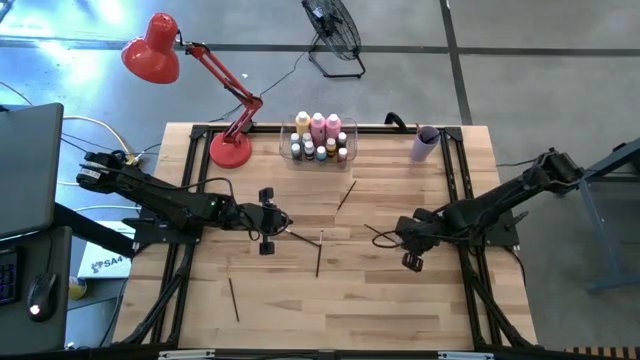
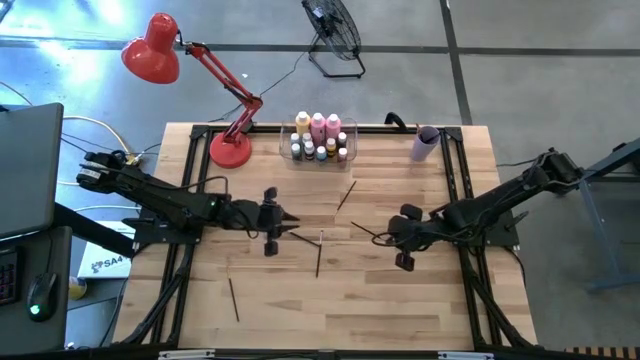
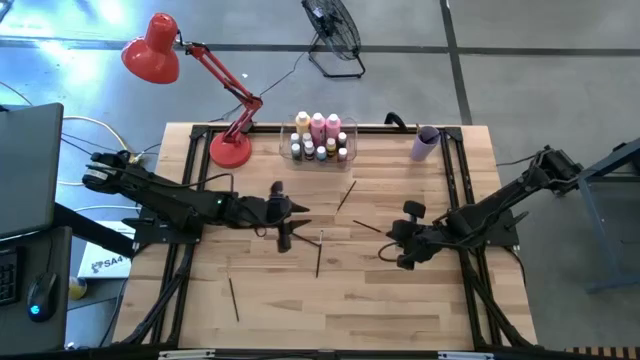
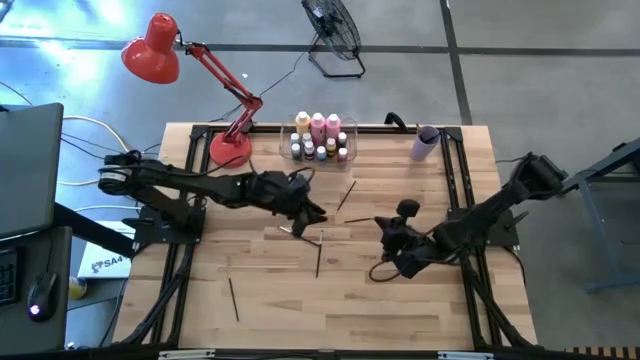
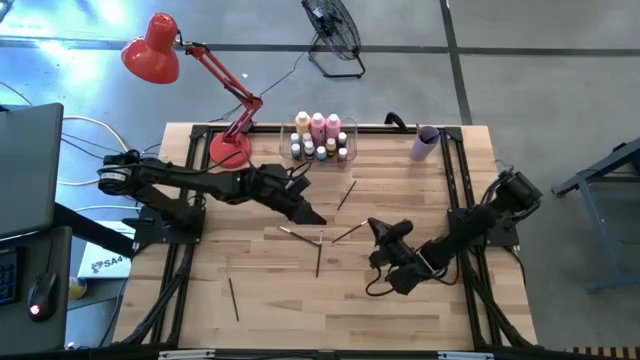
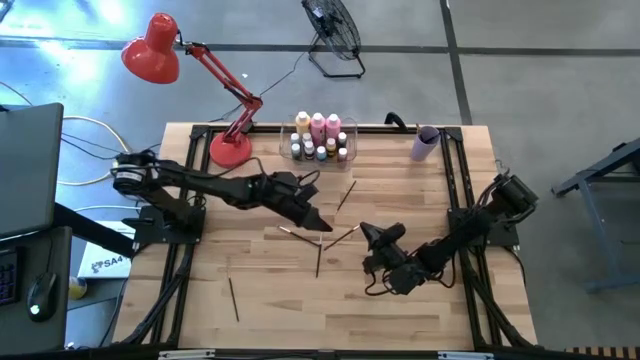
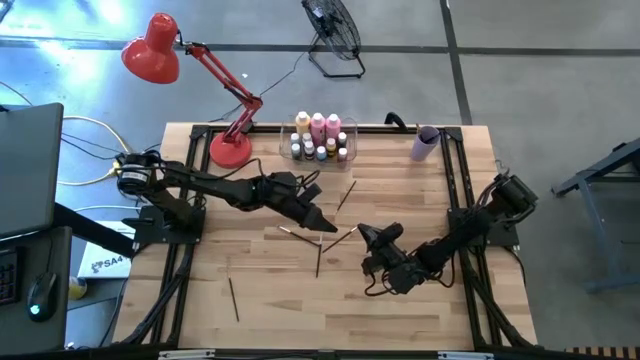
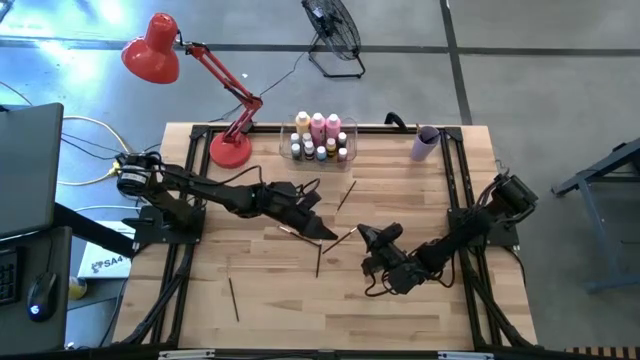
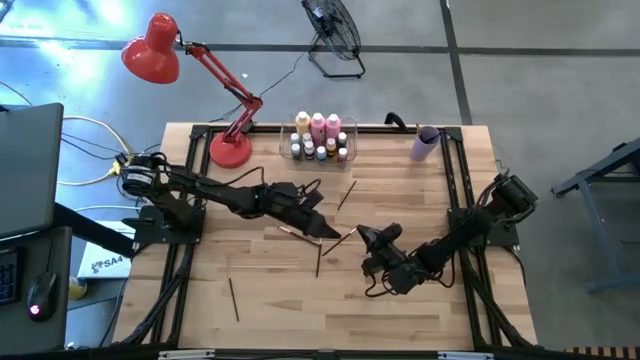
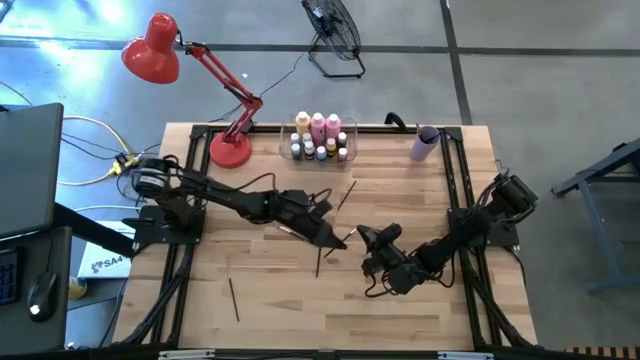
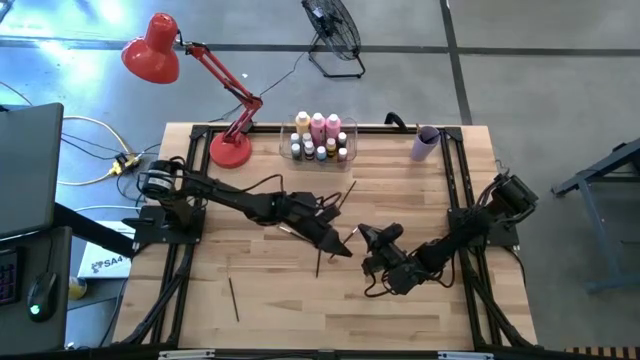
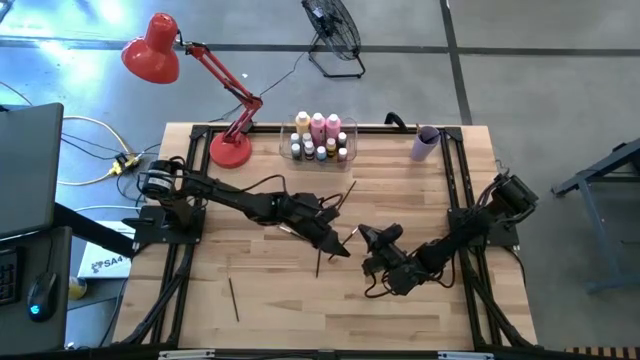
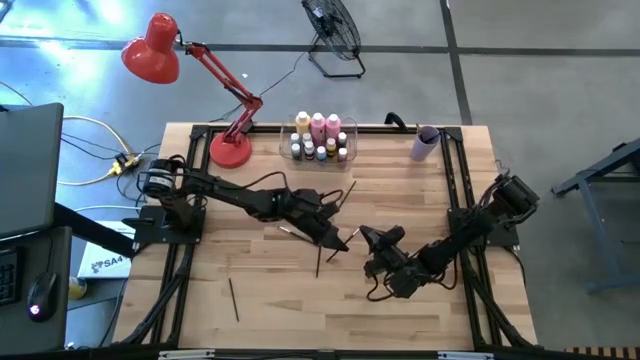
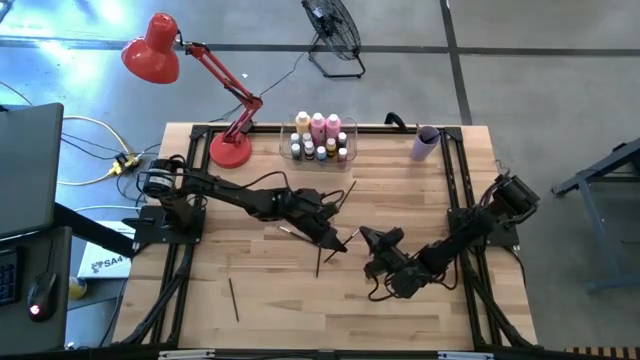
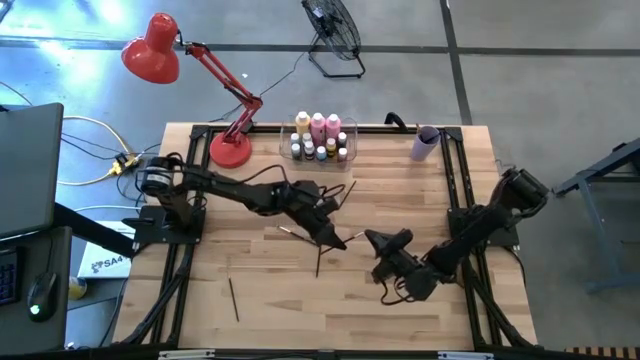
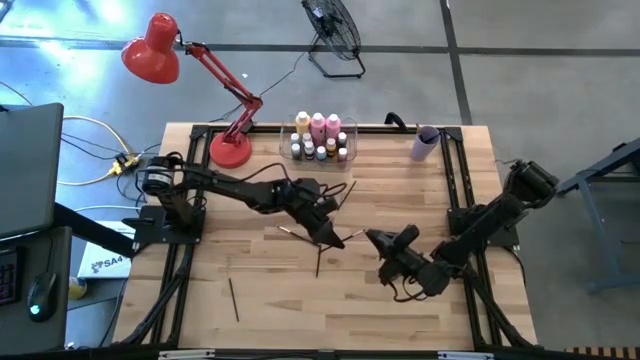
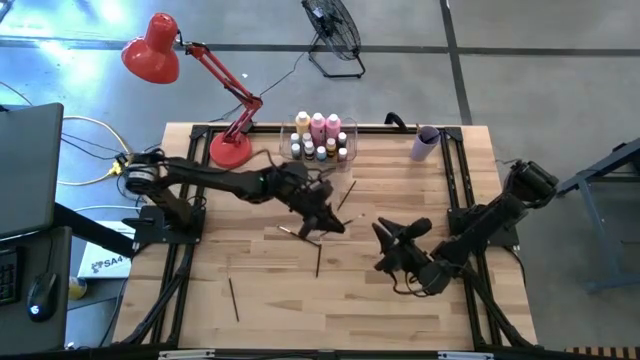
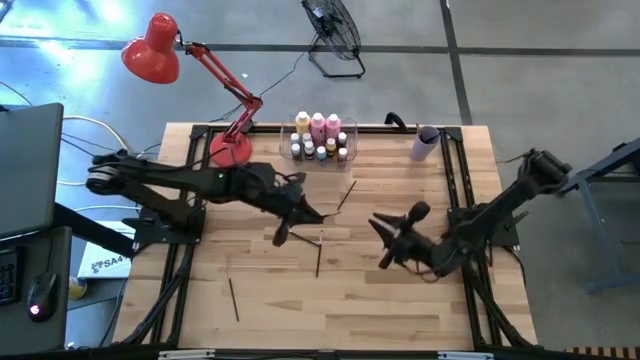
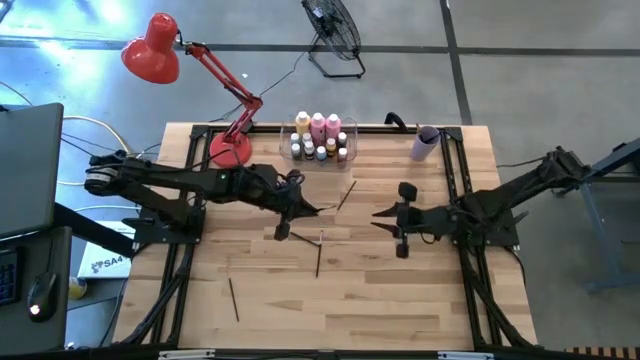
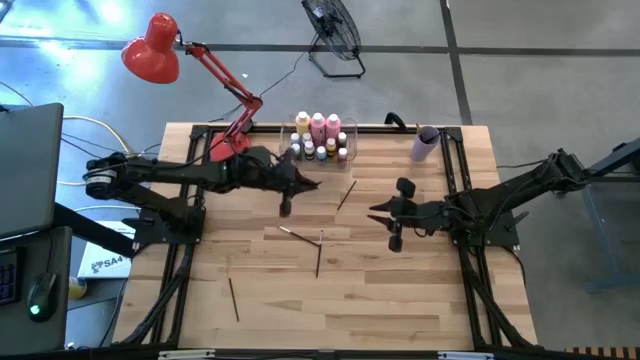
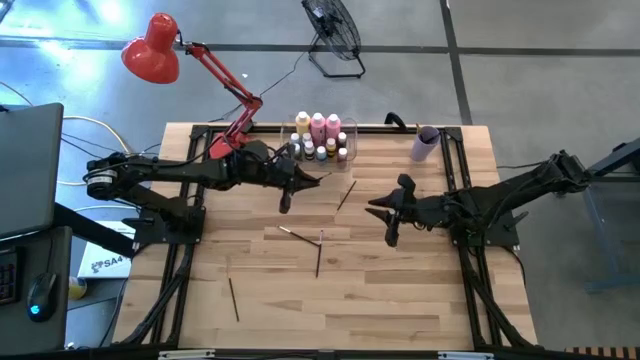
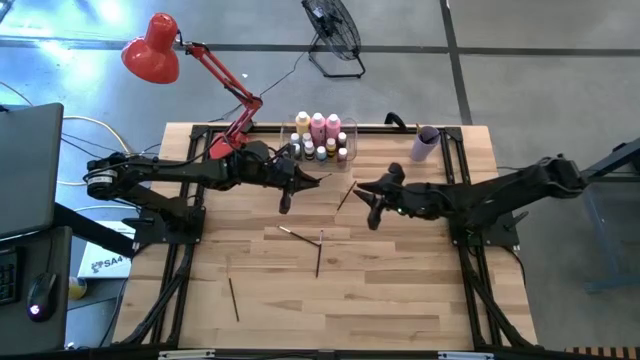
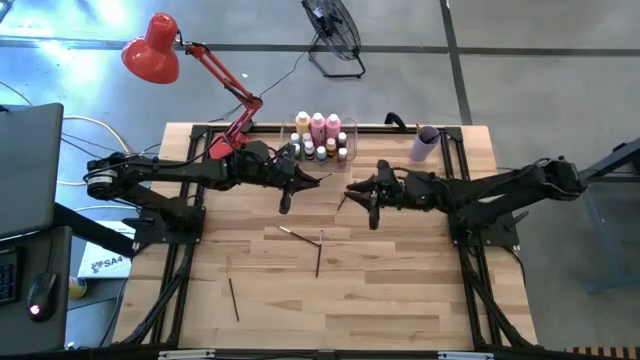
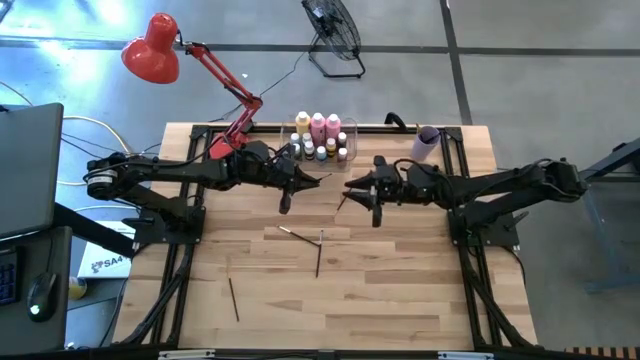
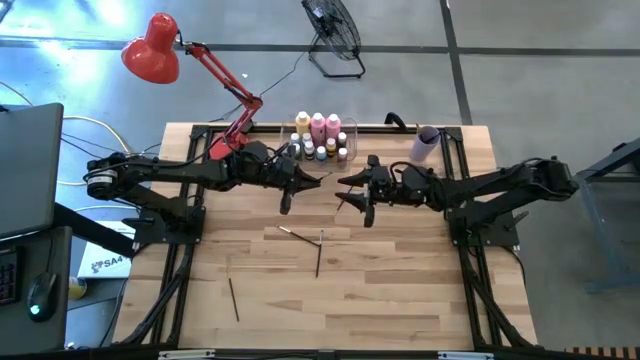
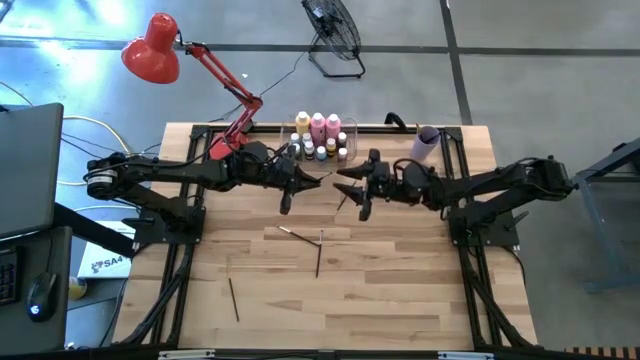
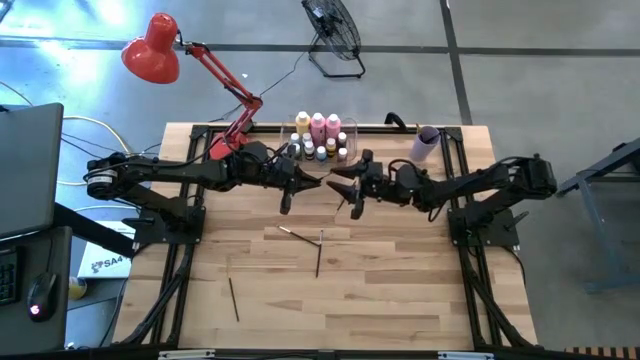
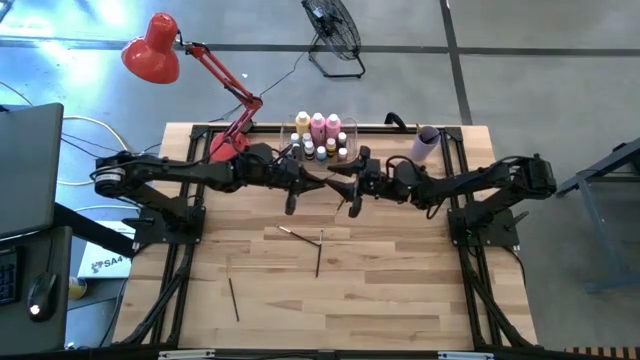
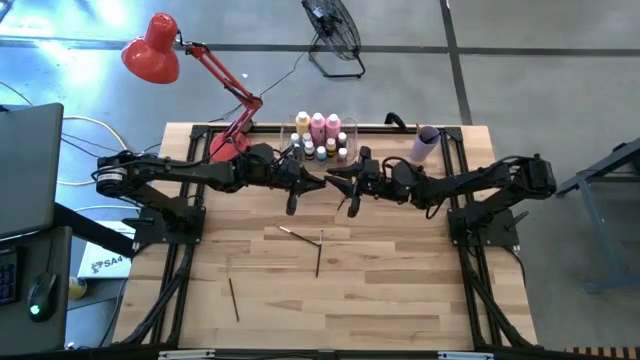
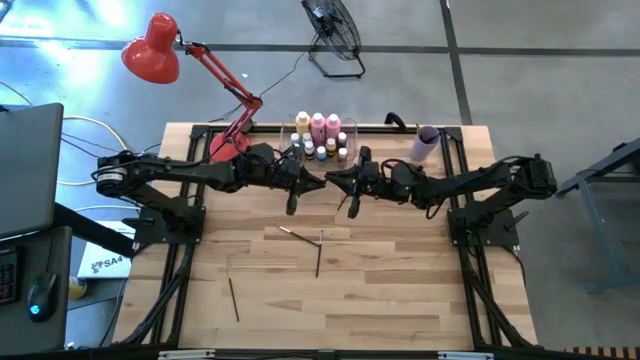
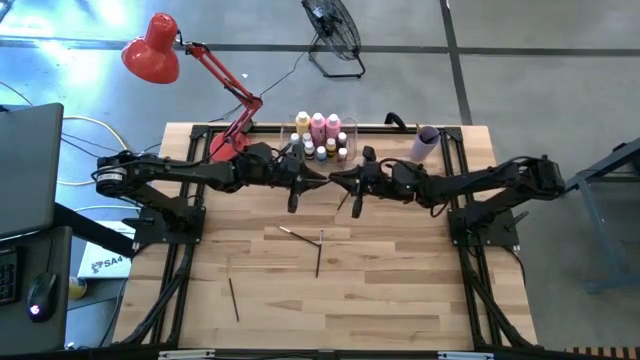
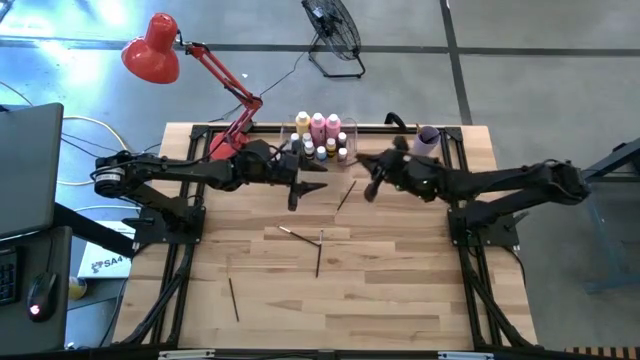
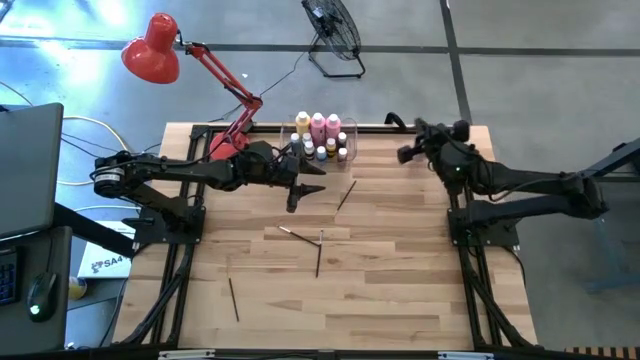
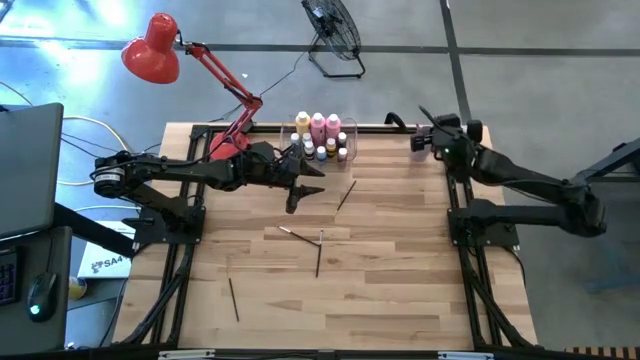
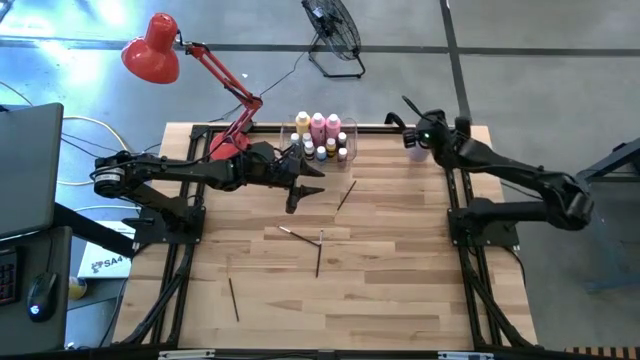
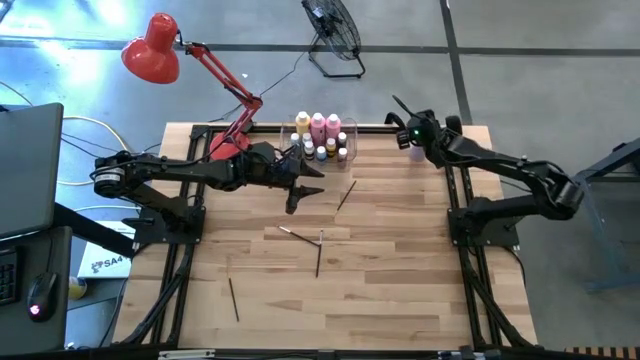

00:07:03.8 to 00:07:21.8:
Task: Pick & Place Paint Supplies
Put the black paint brush into the violet cup

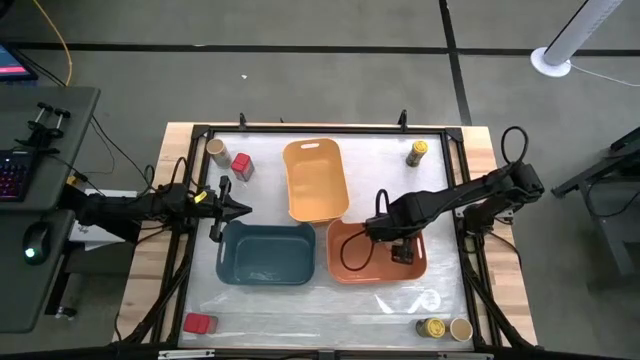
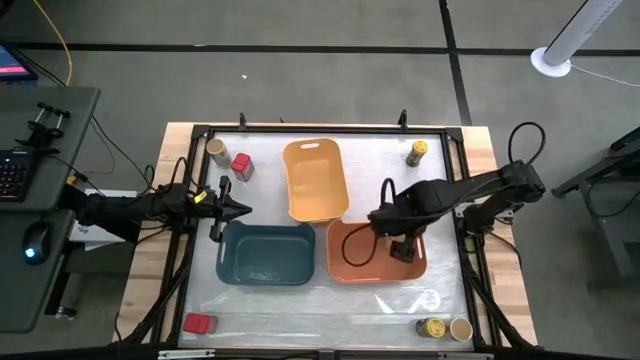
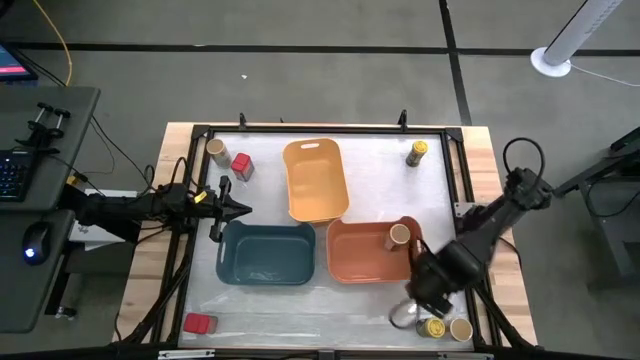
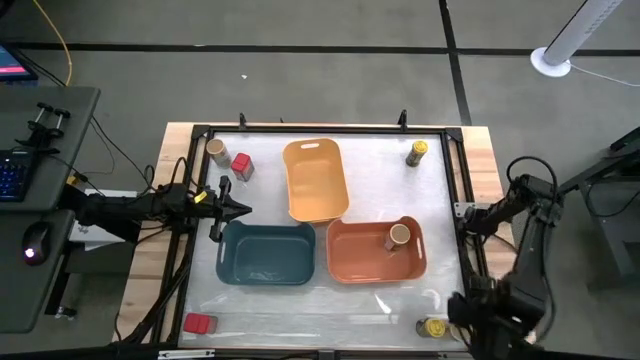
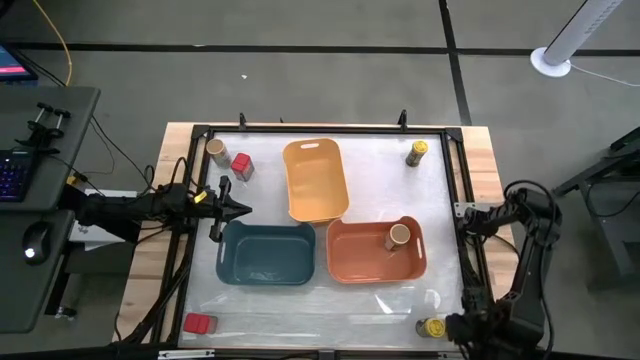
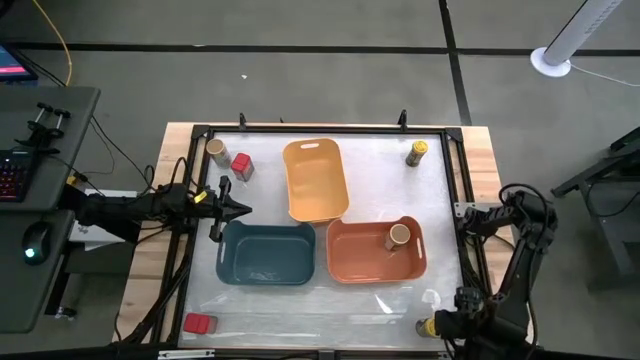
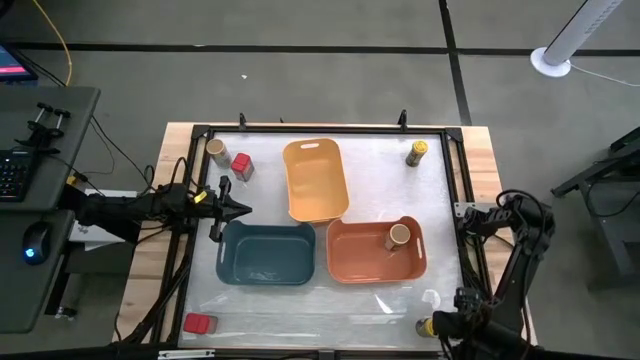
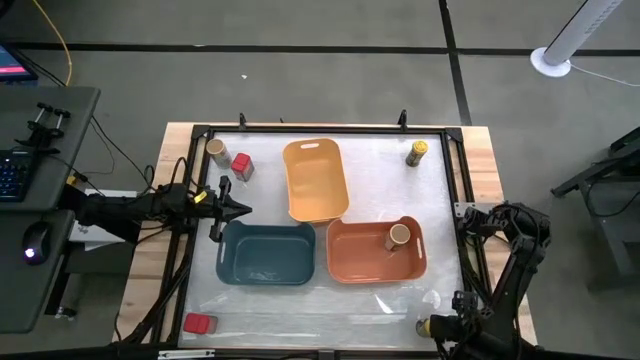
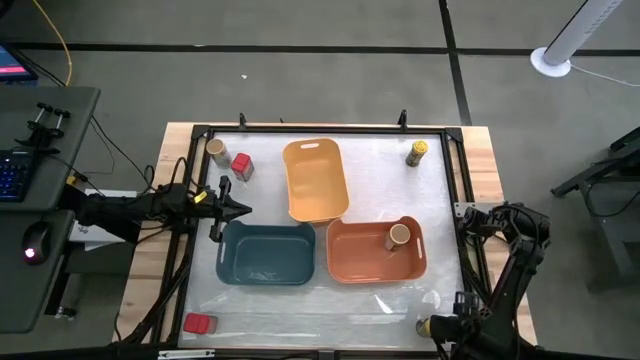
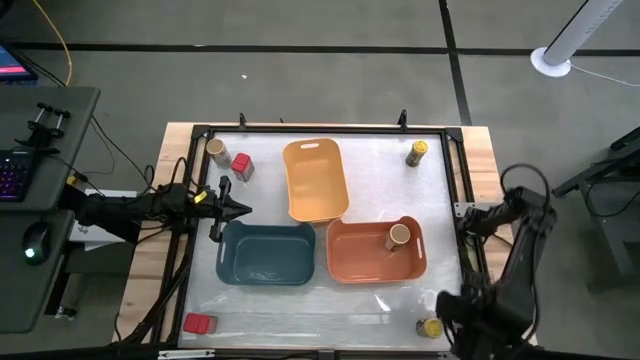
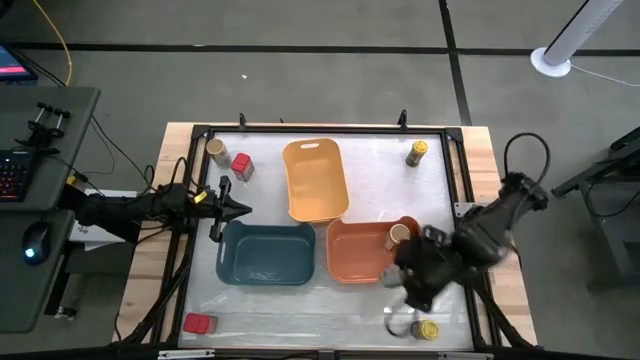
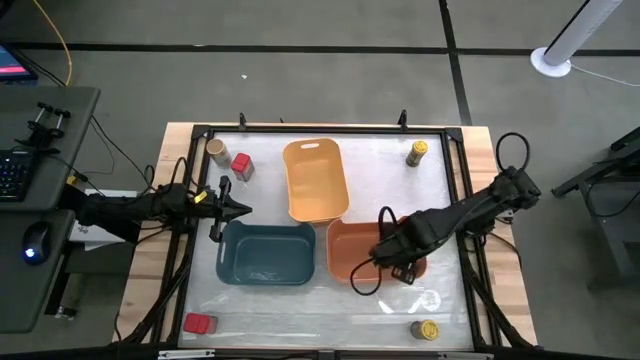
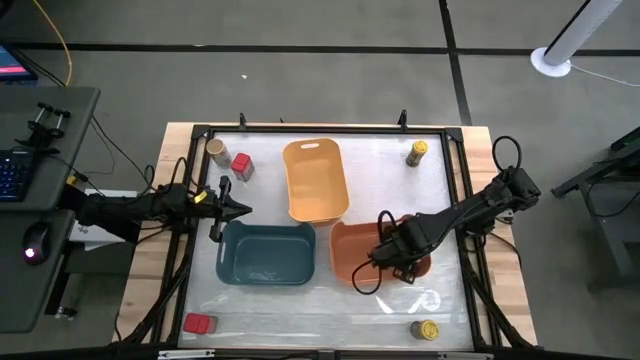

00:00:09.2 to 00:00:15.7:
Task: Sort spices by type
Put the bottom brown seasoning bottle into the orange bin
